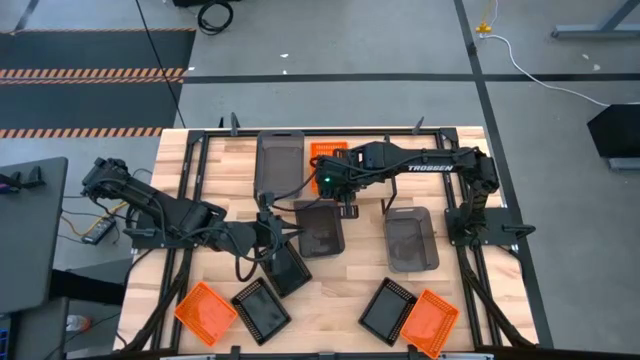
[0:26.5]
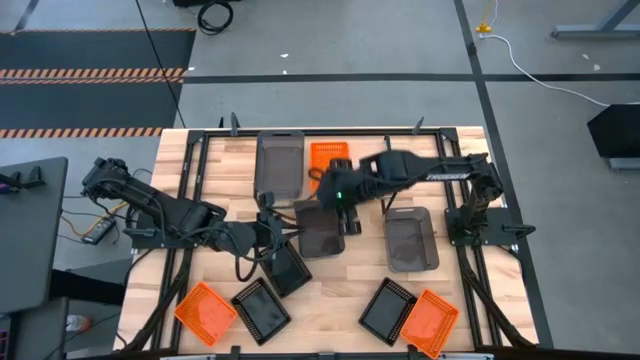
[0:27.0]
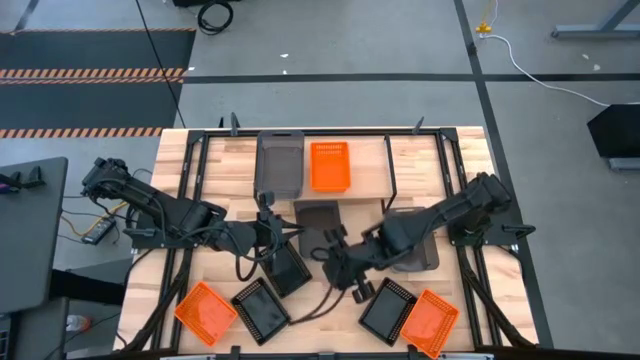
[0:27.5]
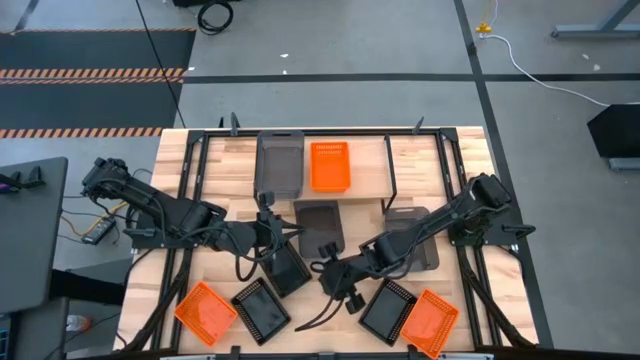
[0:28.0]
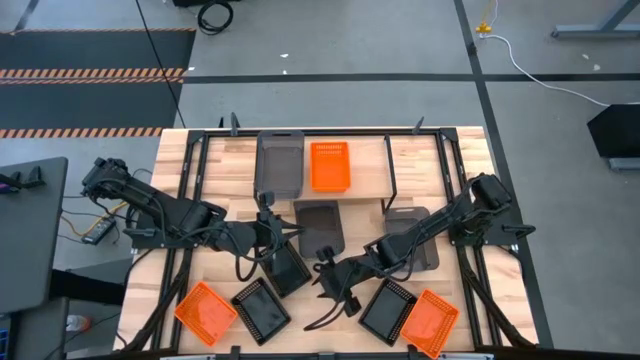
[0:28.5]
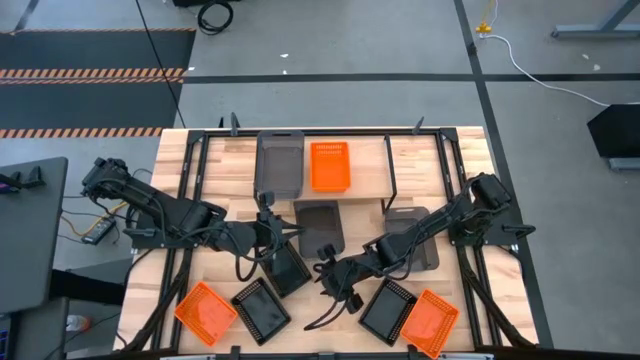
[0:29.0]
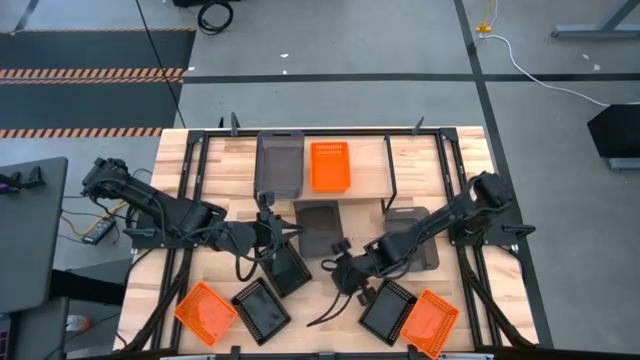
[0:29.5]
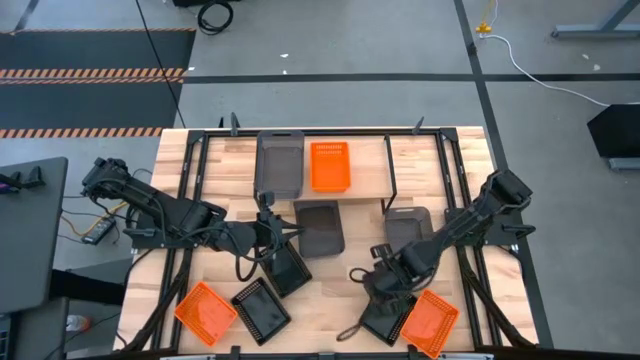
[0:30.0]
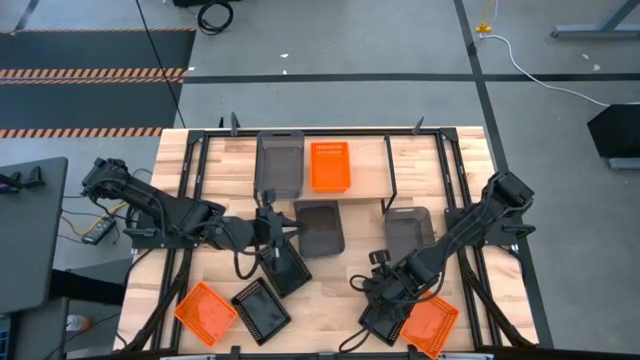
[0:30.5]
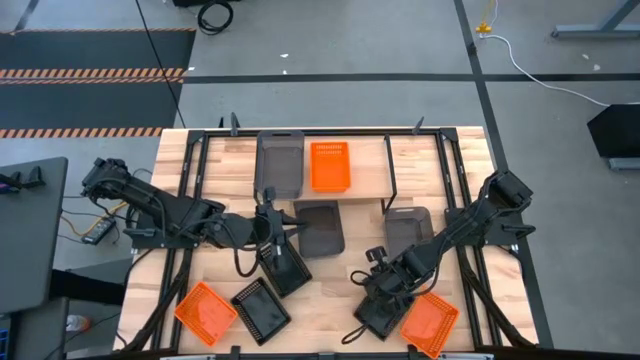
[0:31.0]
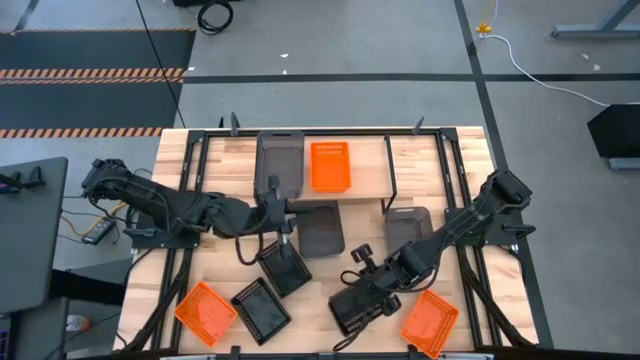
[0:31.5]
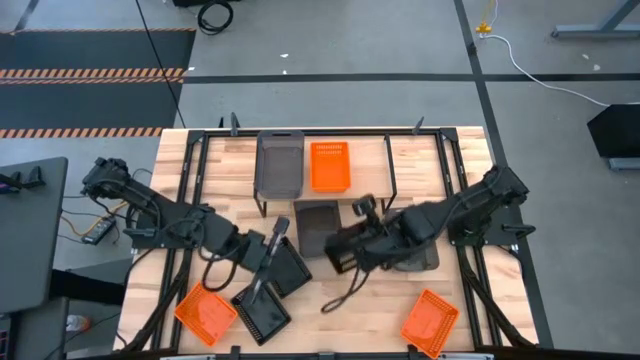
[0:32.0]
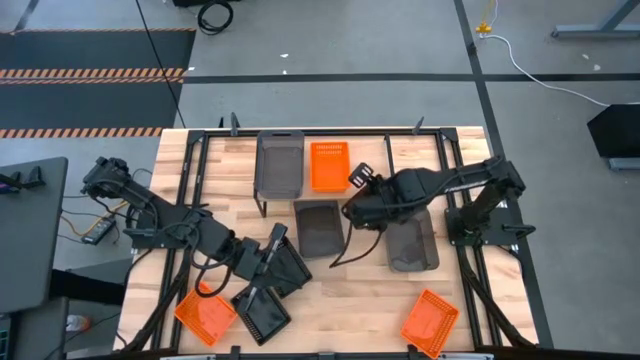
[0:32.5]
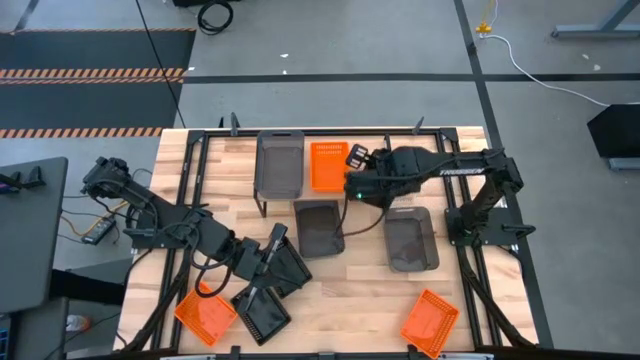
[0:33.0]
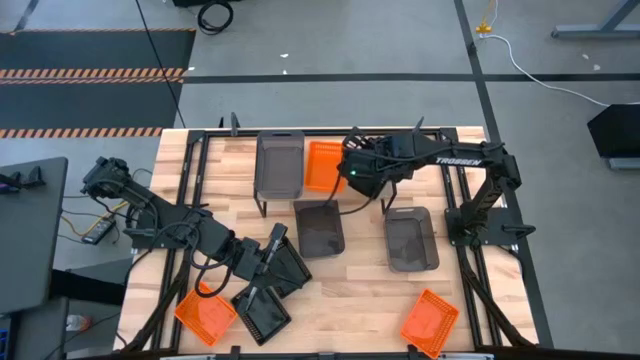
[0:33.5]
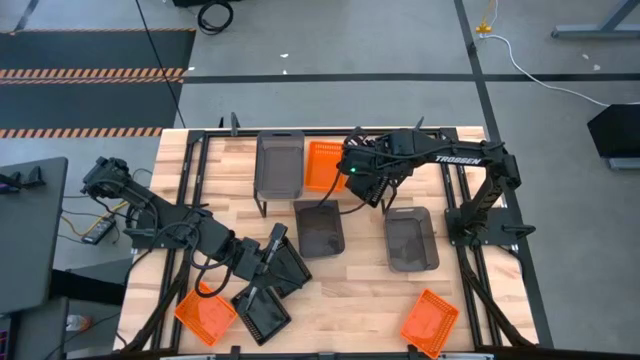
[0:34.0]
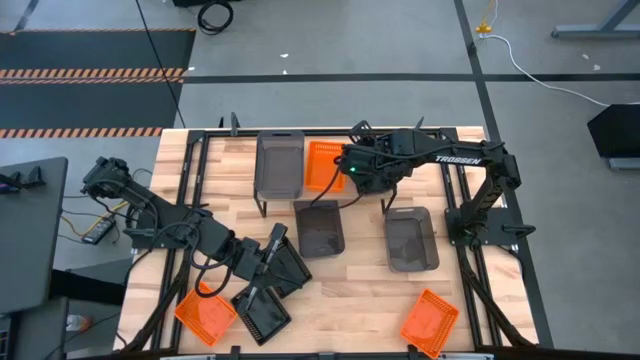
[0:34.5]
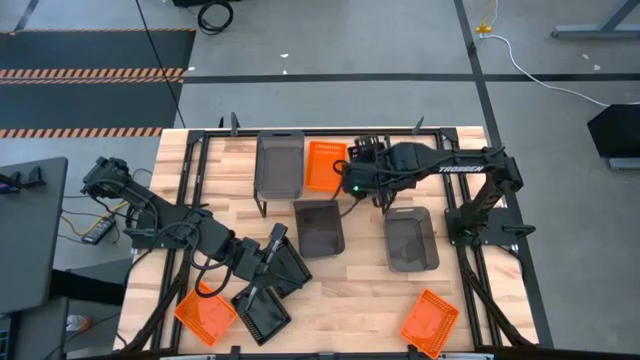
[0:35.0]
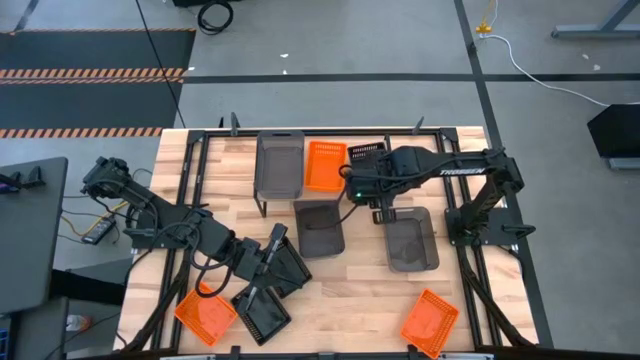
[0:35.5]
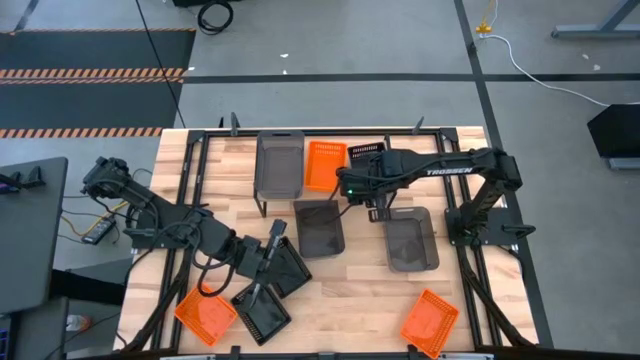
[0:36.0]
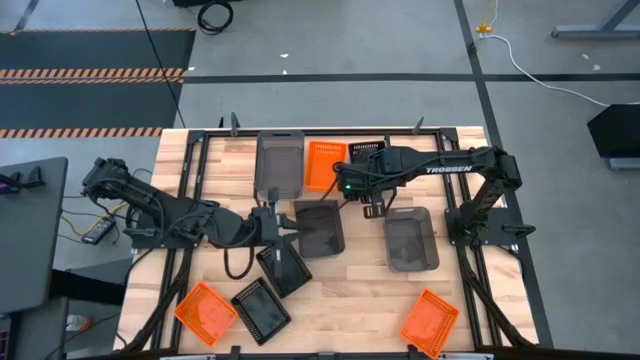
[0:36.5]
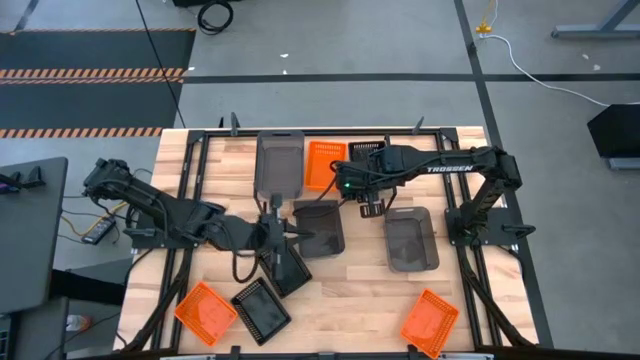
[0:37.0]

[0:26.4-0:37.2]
Task: Stack baskets on shelf by color
Put the bottom right black bin on the shelf

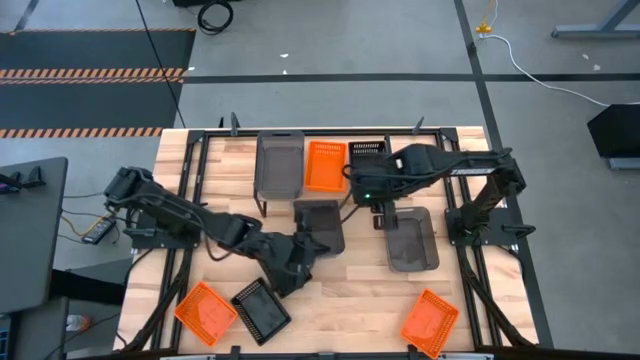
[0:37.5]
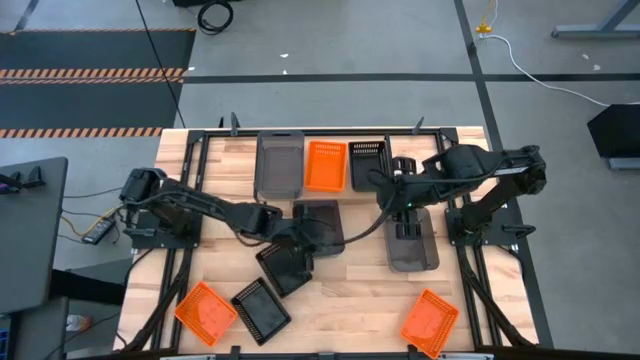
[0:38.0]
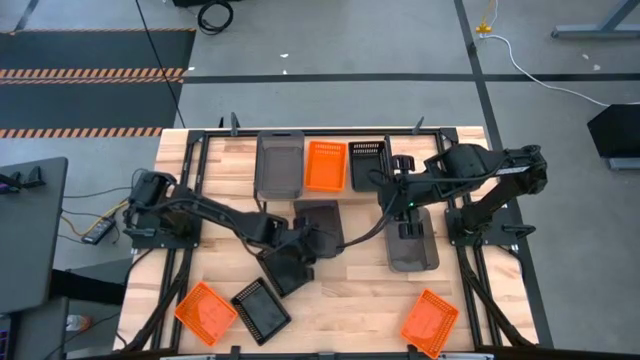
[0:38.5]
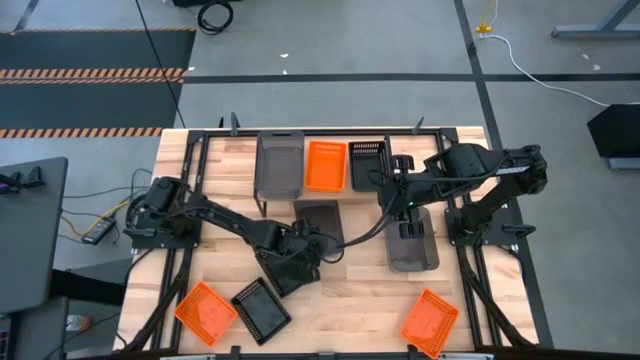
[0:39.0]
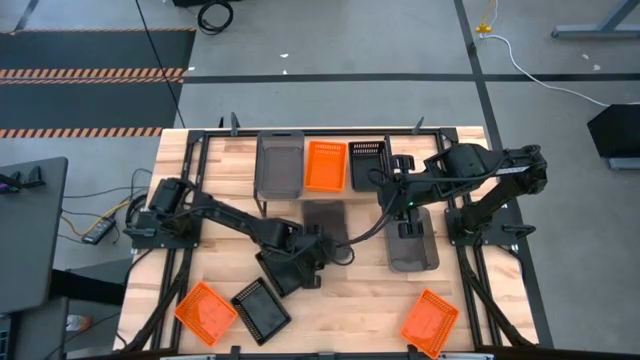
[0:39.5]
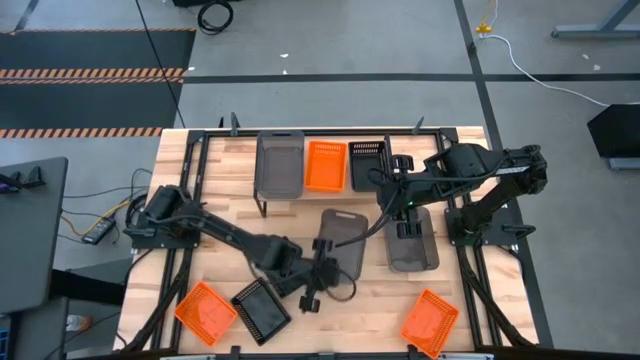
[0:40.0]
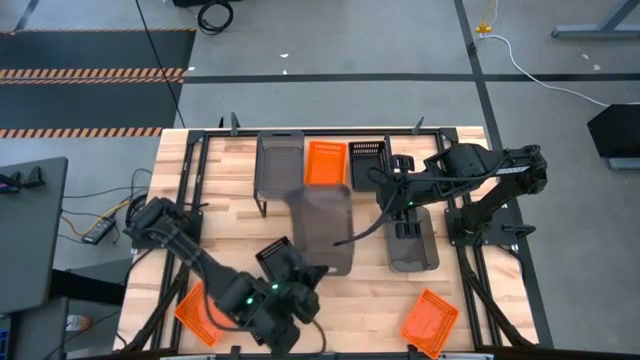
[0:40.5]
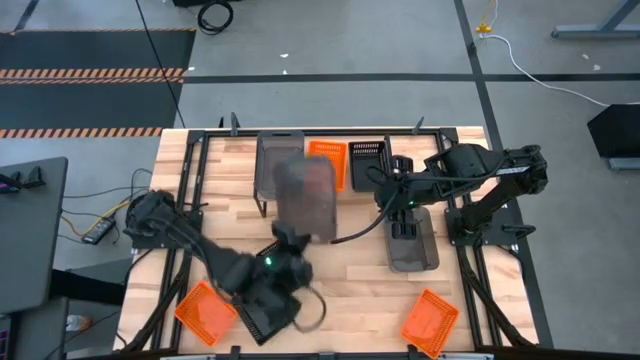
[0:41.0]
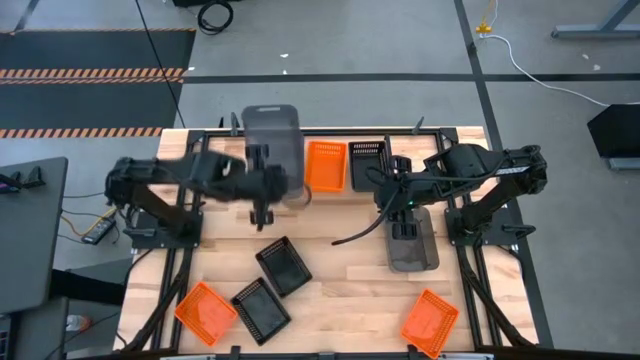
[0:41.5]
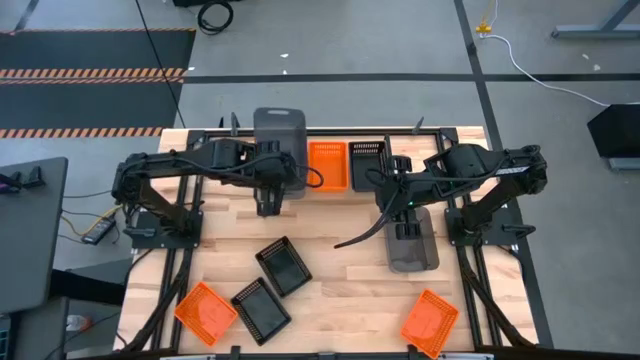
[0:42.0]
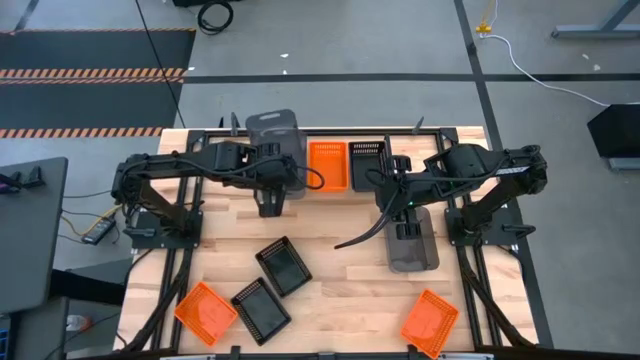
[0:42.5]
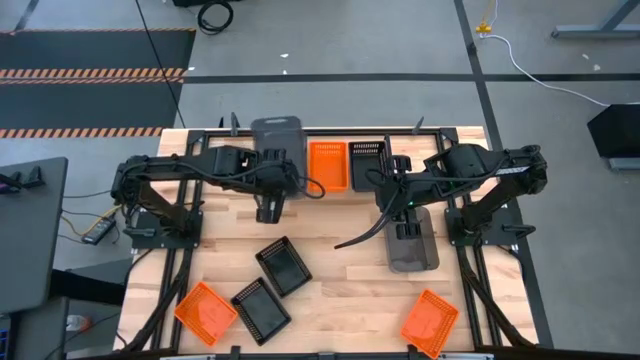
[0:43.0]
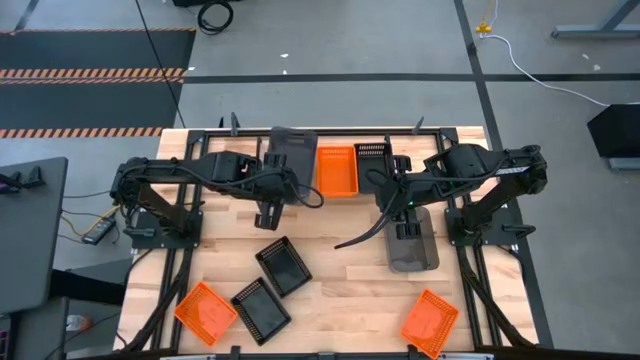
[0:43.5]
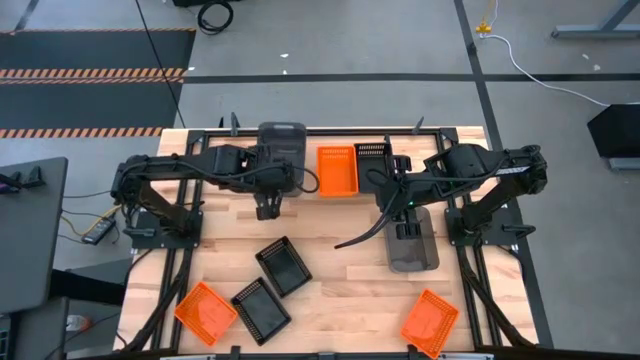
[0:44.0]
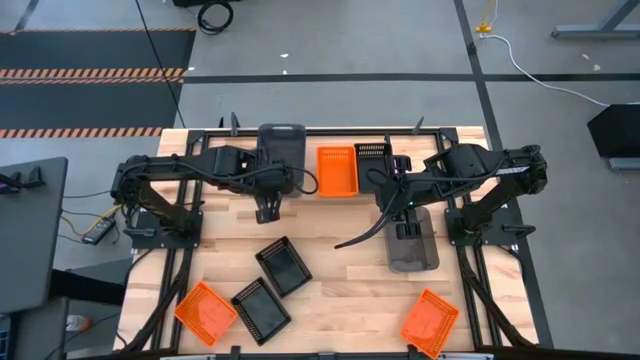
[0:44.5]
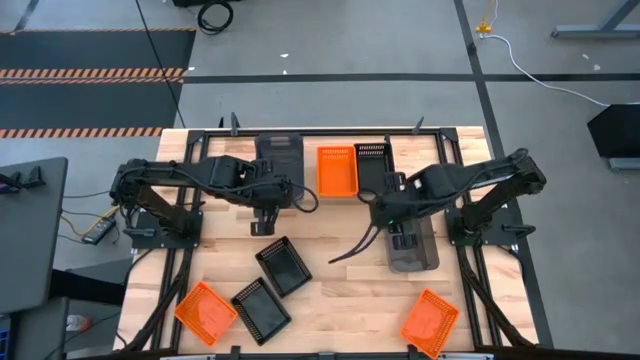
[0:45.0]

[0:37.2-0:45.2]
Stack the left gray bin on the gray bin on the shelf

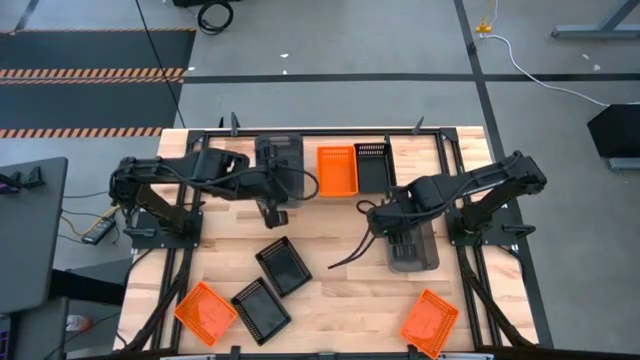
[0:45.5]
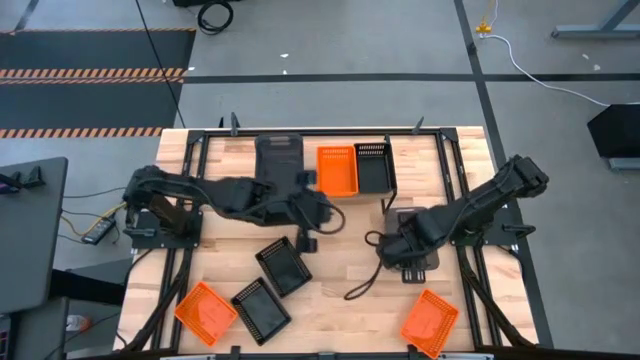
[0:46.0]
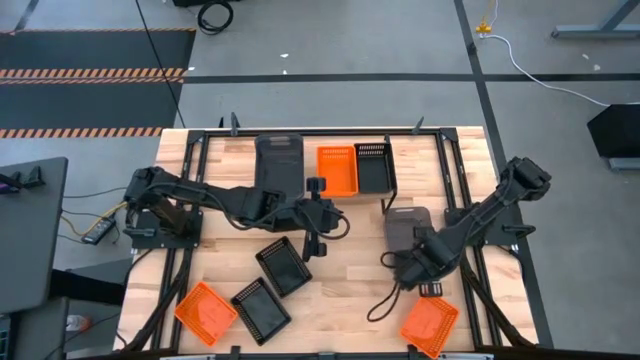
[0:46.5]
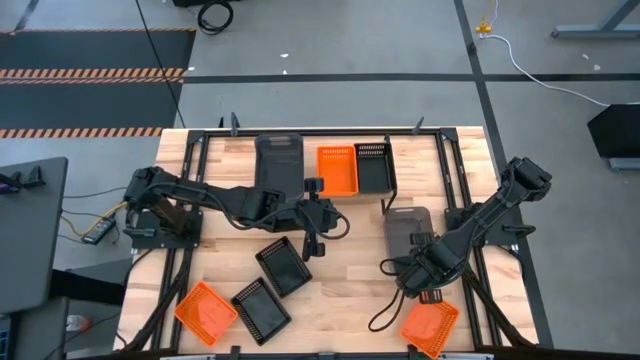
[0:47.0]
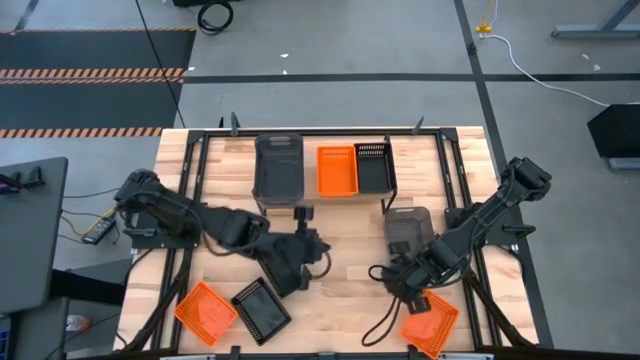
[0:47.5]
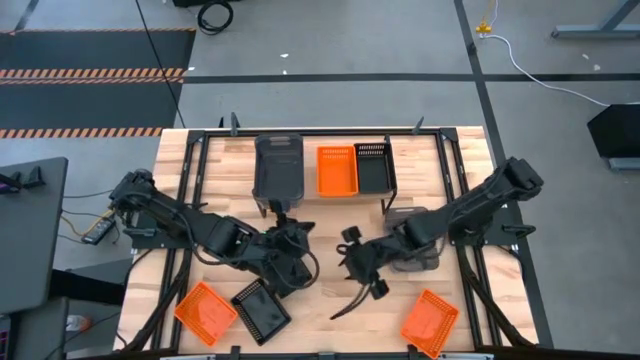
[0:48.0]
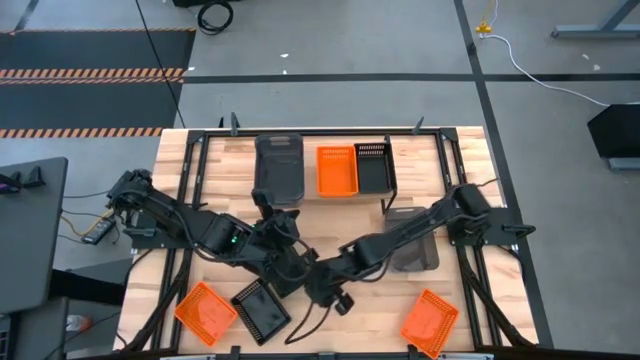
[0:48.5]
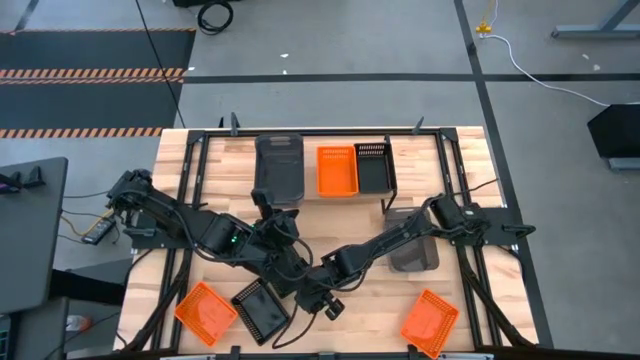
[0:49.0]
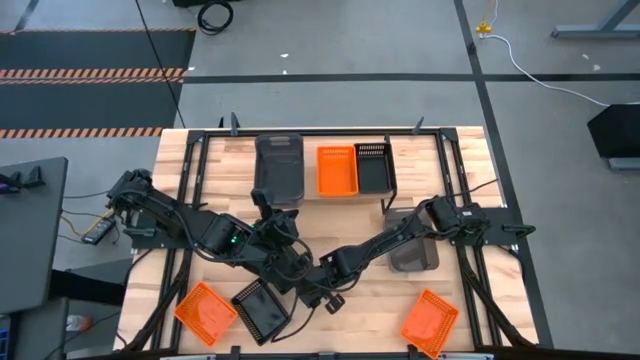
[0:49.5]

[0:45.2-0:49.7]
Stack the top black bin on the black bin on the shelf
